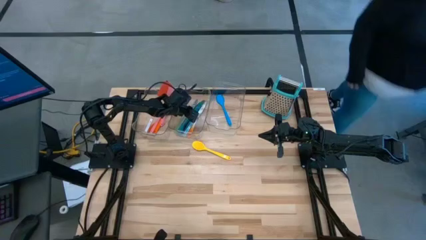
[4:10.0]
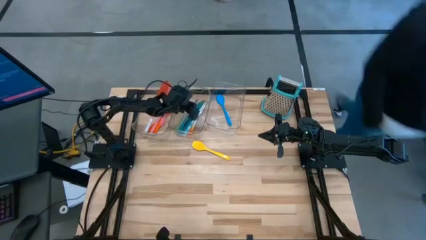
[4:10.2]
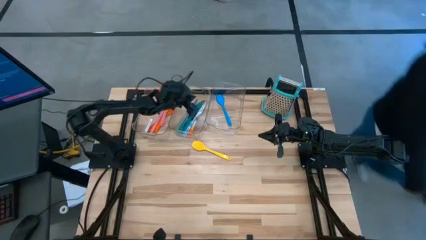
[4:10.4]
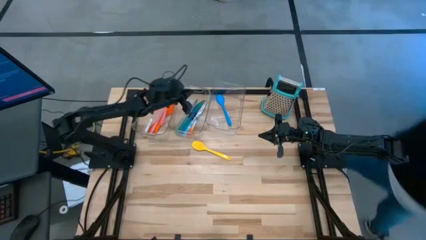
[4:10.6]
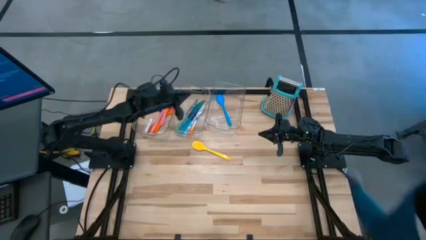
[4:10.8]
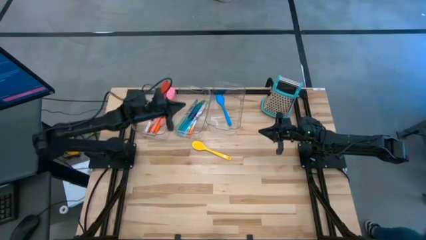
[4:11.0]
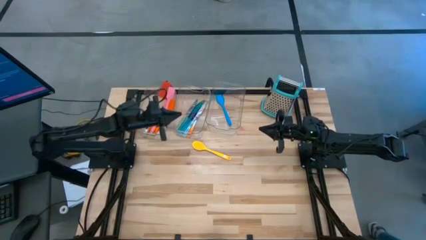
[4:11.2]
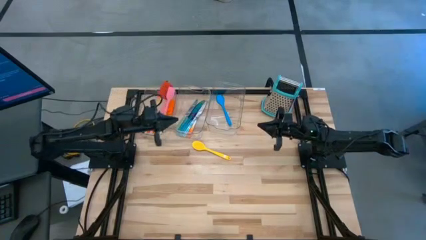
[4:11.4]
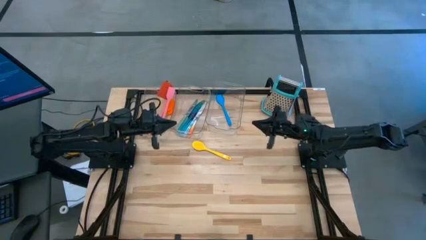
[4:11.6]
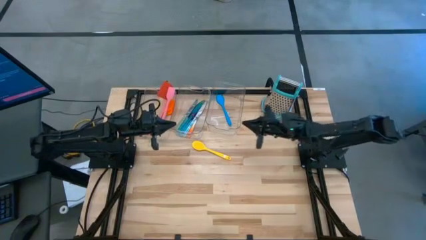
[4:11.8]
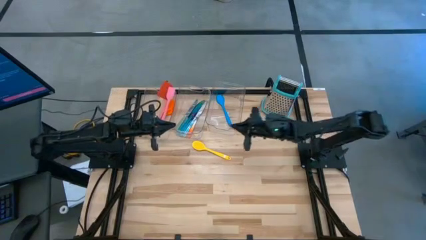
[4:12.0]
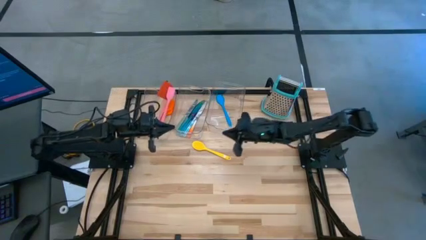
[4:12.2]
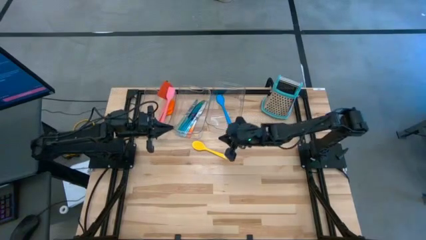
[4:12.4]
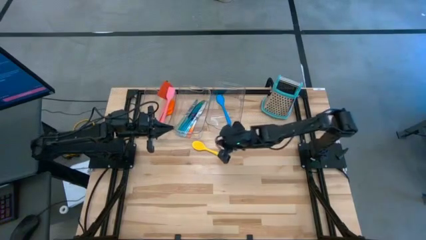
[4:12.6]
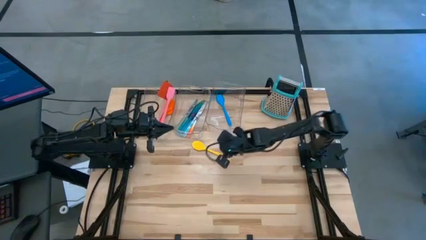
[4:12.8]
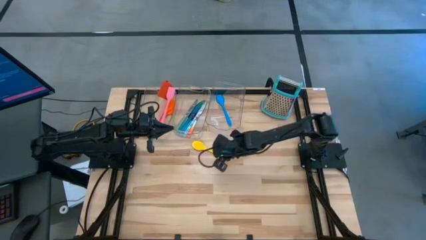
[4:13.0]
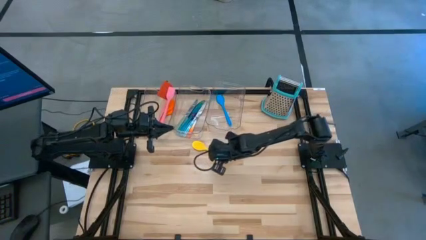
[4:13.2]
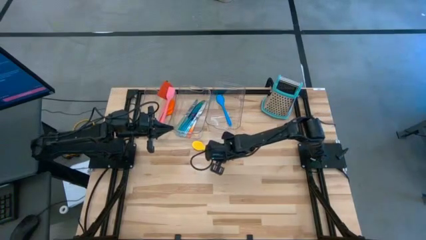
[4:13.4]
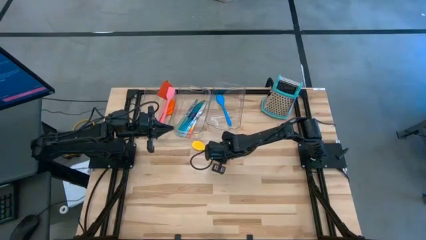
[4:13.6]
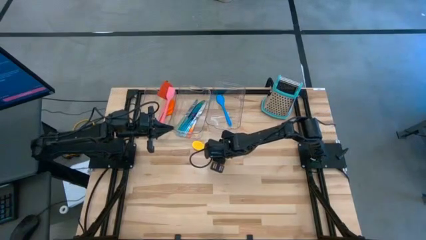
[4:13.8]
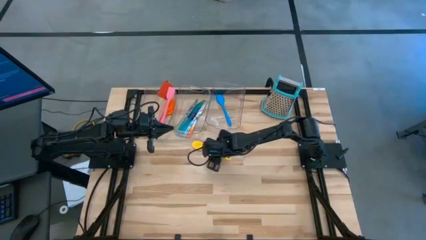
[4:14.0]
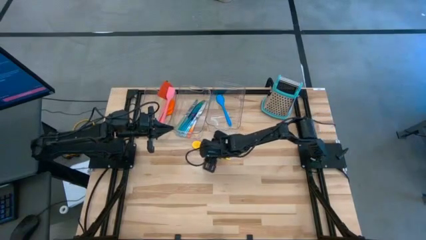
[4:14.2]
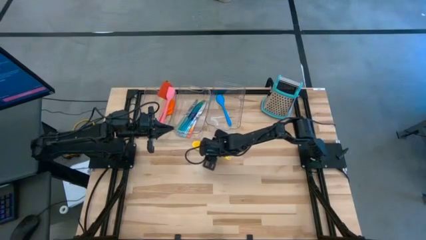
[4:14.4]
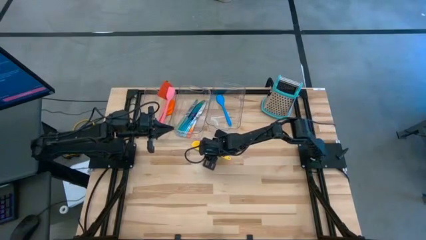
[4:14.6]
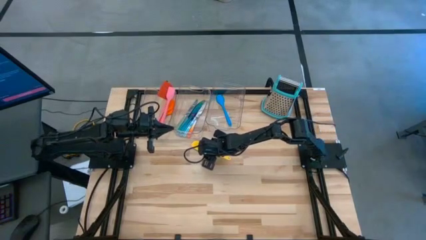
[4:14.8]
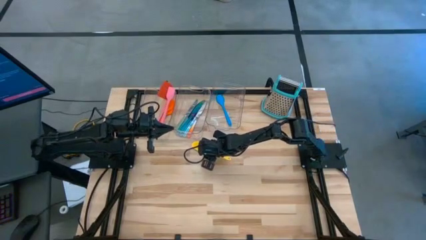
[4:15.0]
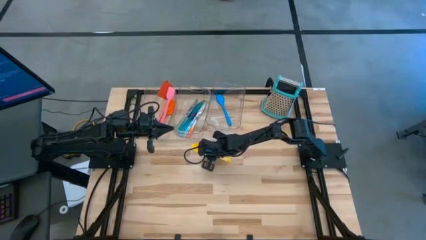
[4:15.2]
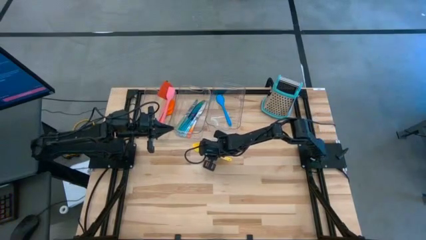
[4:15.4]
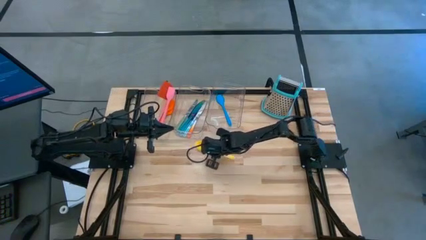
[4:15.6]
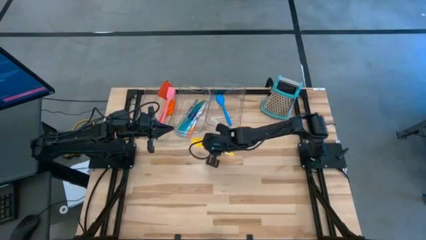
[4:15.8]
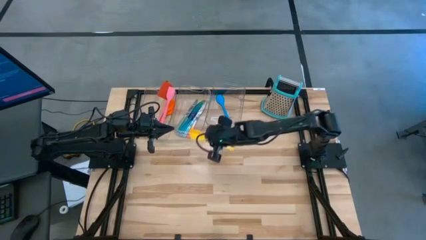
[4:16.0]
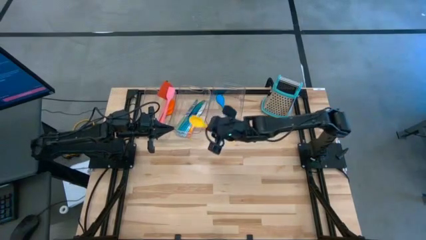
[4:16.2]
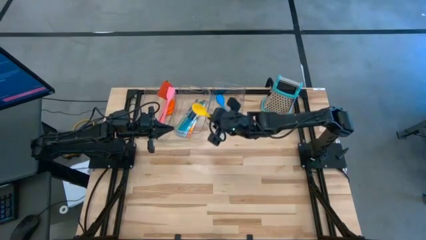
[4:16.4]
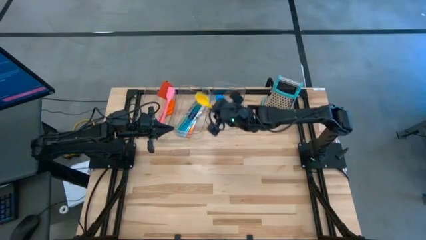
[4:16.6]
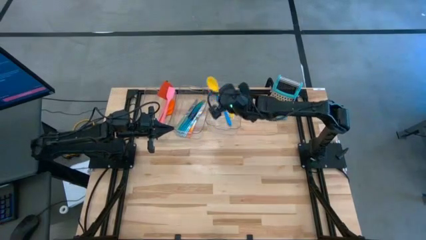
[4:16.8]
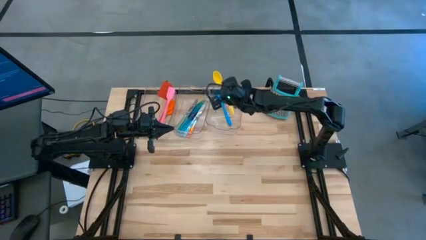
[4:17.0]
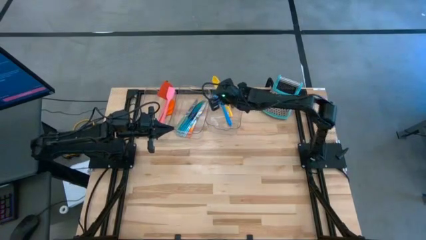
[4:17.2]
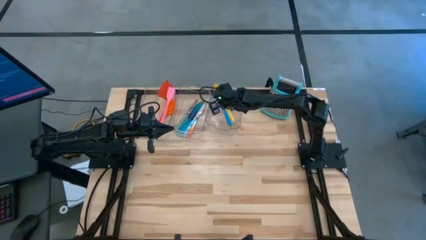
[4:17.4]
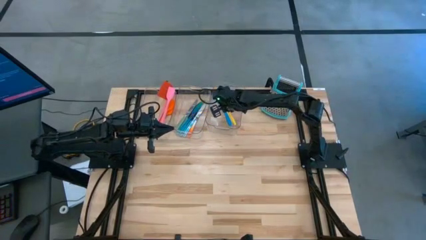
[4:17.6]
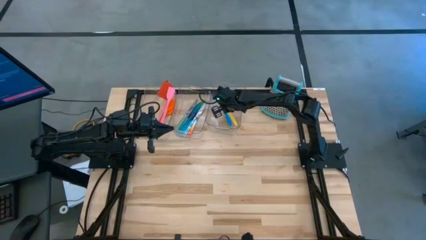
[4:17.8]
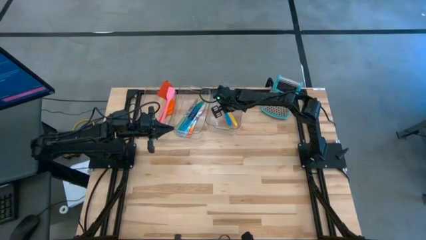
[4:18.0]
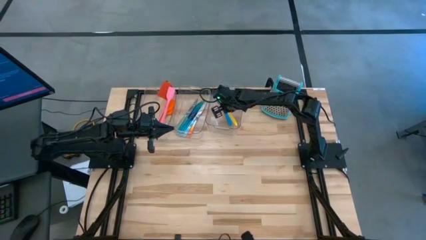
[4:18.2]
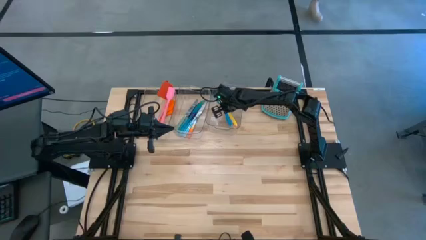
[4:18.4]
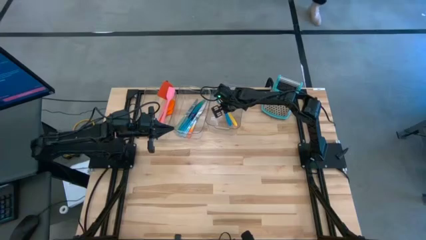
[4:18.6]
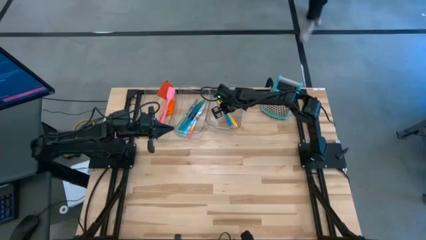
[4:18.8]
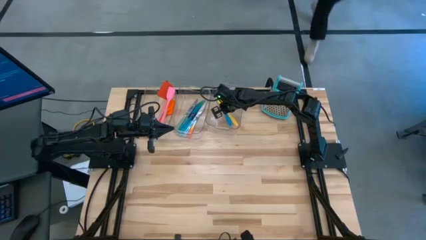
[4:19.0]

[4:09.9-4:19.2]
Task: Pick & Place Kitchen Items
Put the yellow serving spoon into the right transparent bin

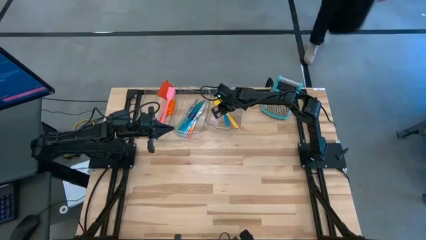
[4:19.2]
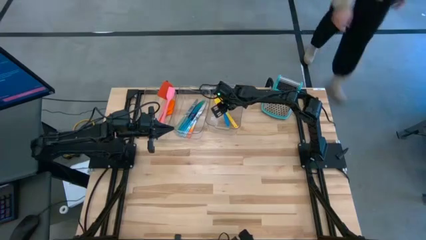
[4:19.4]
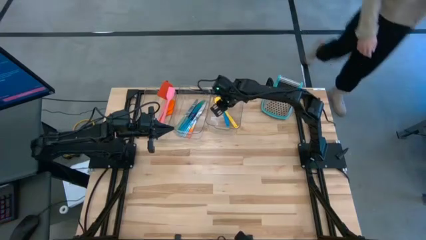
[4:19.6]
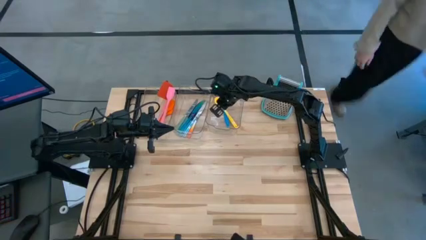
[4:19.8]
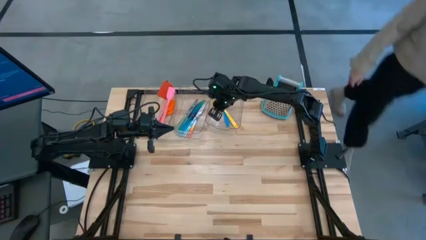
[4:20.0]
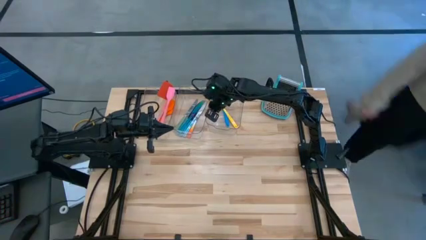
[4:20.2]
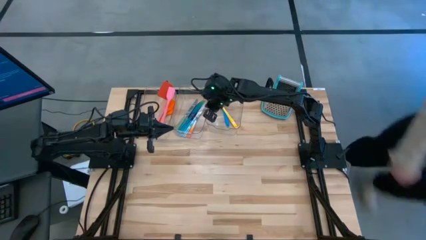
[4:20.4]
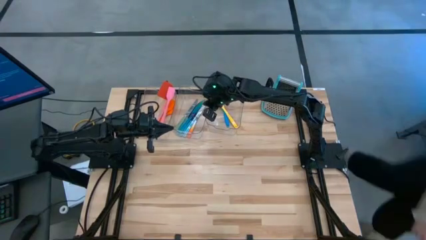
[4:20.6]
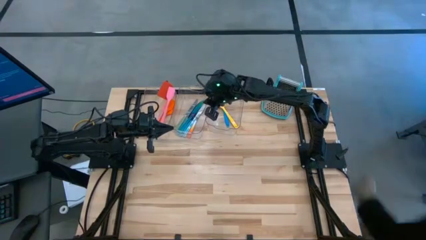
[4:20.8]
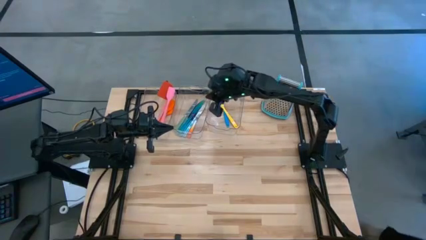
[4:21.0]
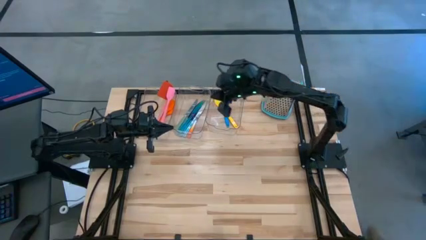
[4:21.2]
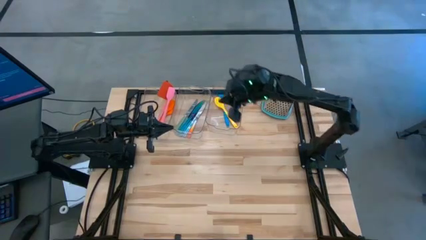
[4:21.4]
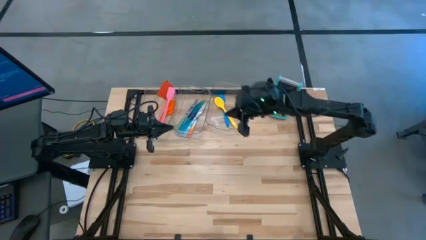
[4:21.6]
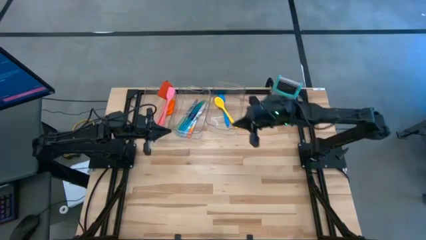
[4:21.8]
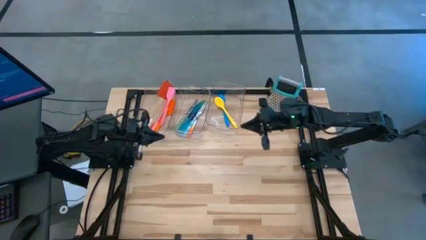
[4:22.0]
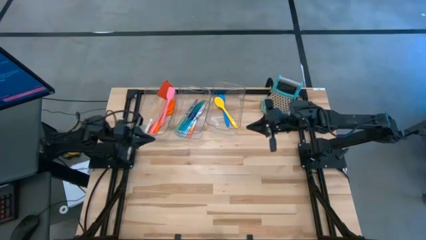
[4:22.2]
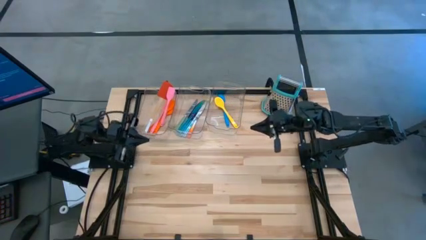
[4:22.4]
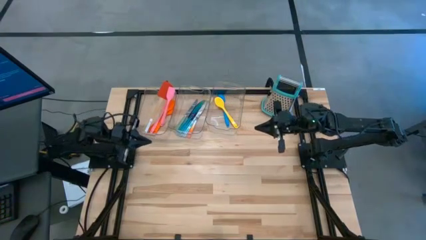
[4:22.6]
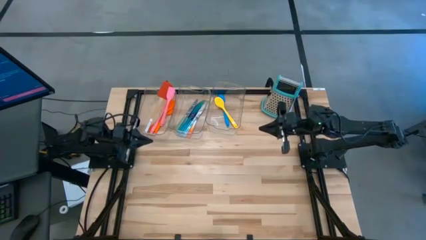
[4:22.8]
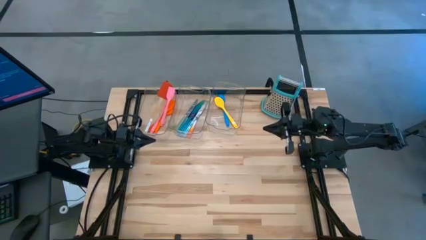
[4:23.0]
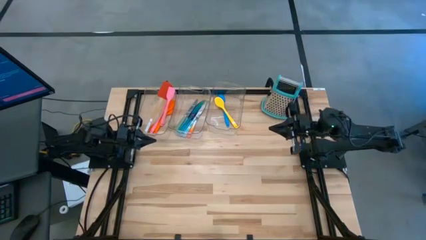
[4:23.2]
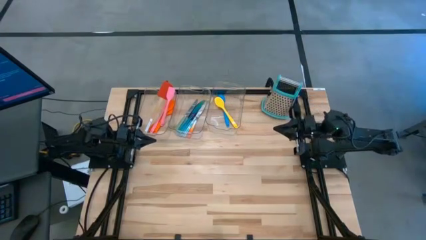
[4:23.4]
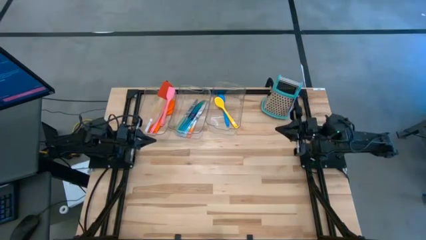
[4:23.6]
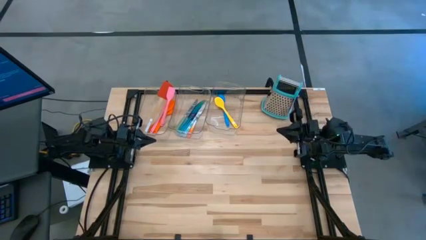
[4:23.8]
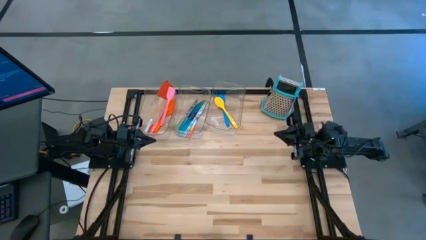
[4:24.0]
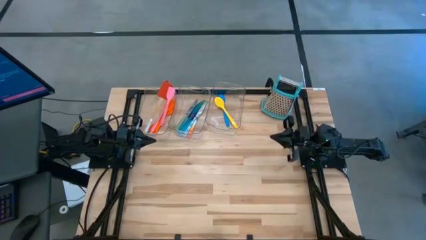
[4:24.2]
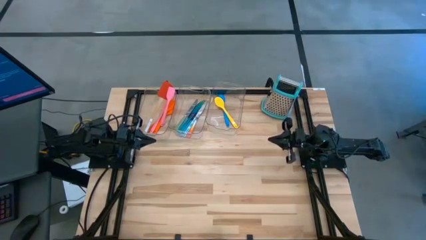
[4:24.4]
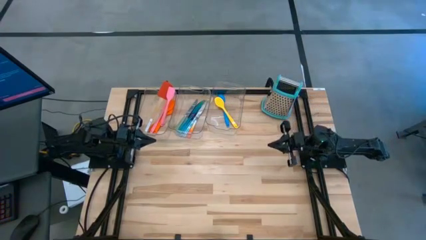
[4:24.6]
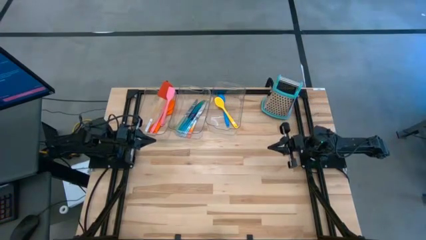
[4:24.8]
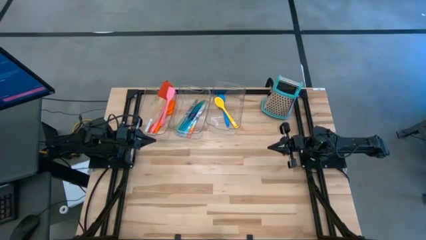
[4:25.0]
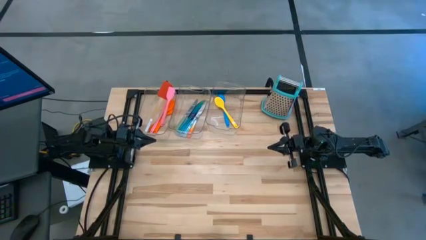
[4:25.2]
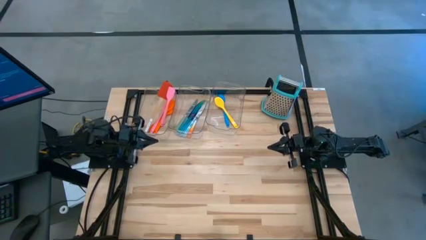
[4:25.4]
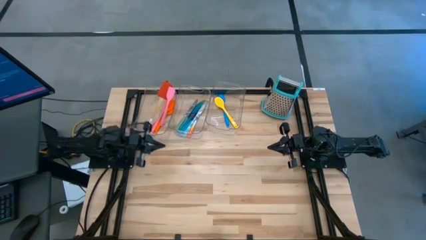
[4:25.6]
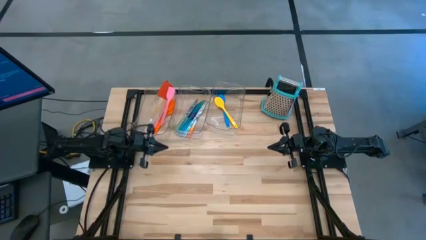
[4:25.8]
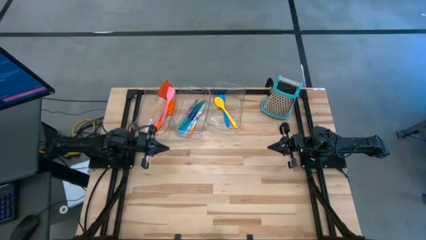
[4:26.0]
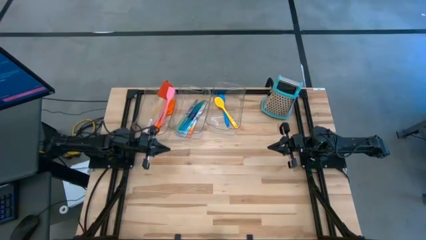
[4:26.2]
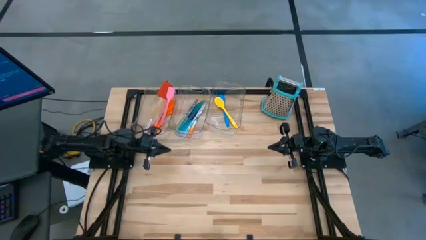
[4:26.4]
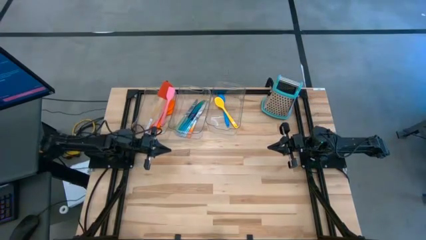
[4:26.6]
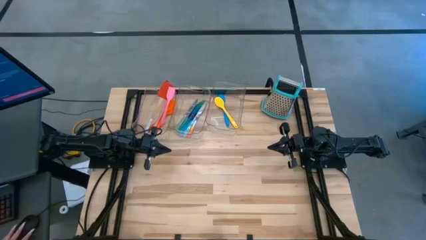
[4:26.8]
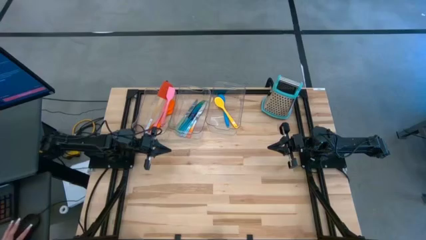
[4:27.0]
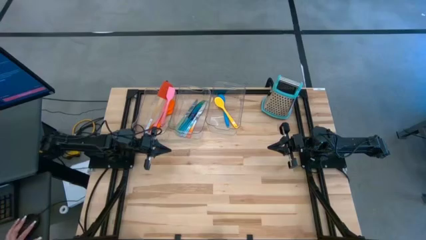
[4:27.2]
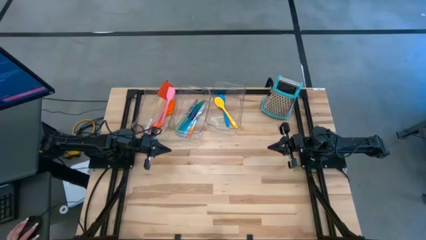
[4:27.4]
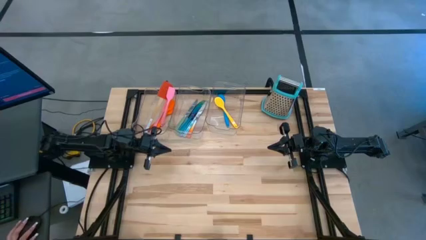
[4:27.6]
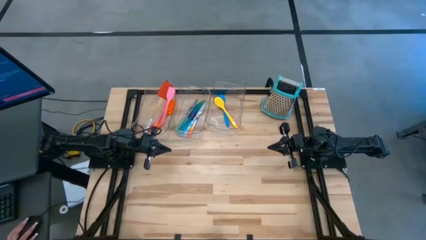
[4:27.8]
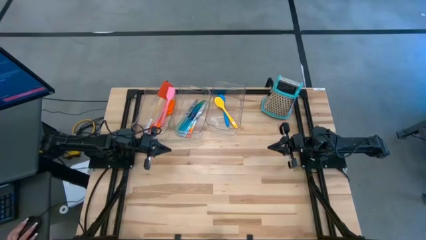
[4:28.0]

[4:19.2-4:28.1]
Return to Home Position
